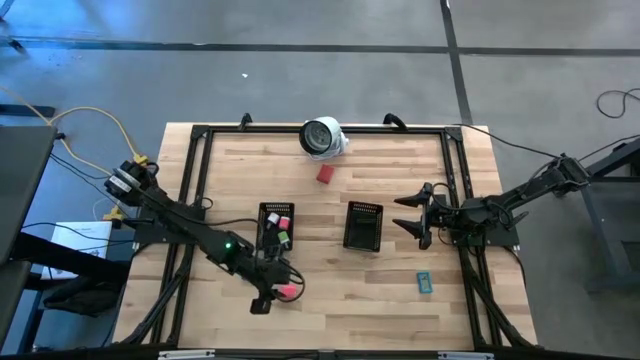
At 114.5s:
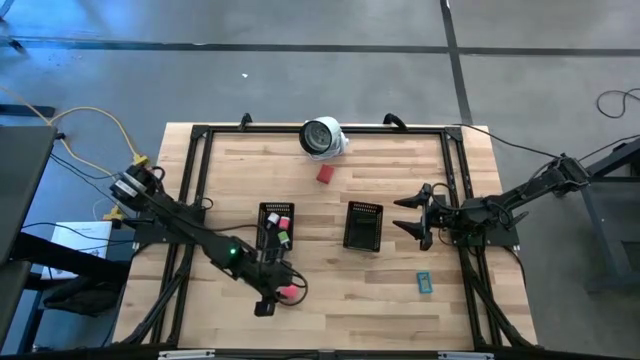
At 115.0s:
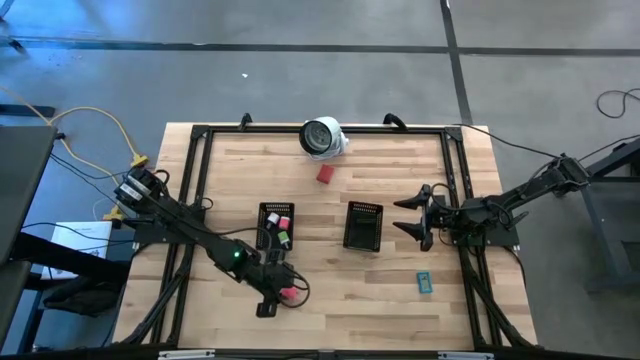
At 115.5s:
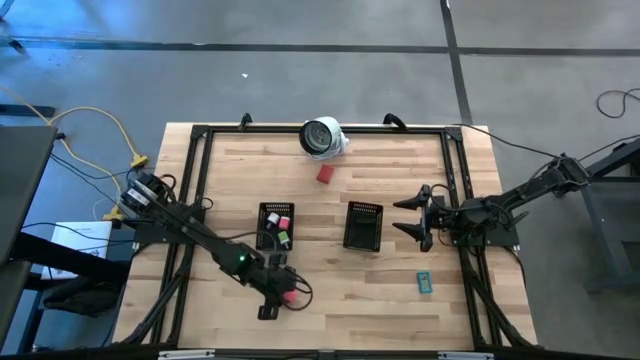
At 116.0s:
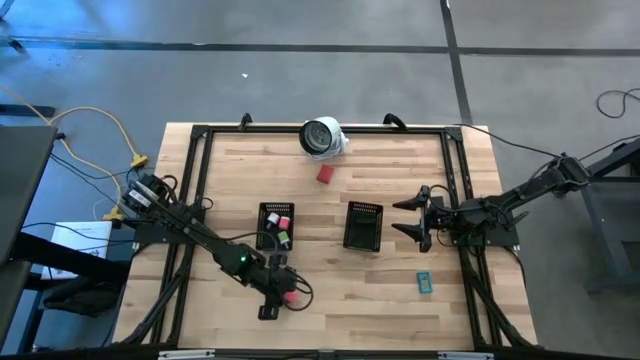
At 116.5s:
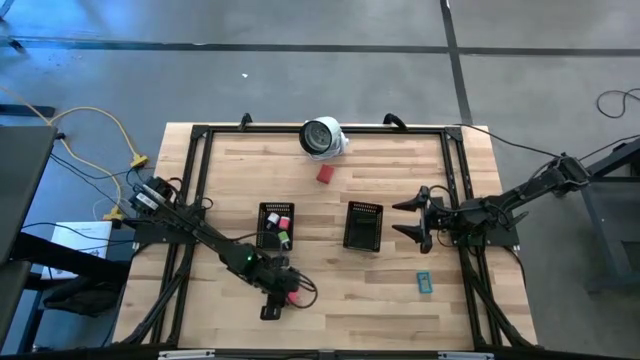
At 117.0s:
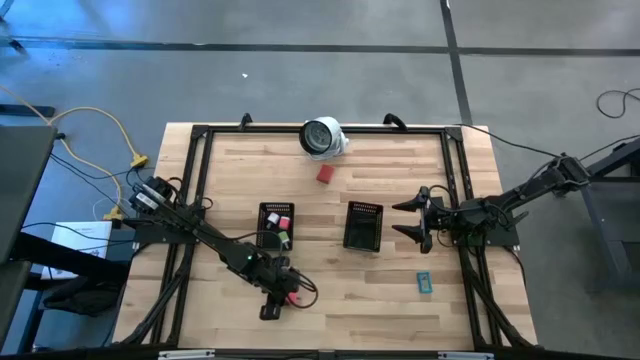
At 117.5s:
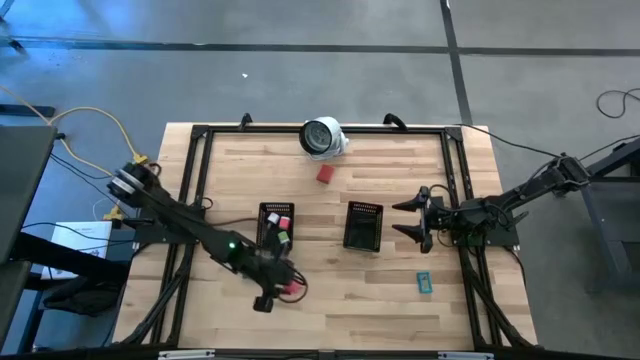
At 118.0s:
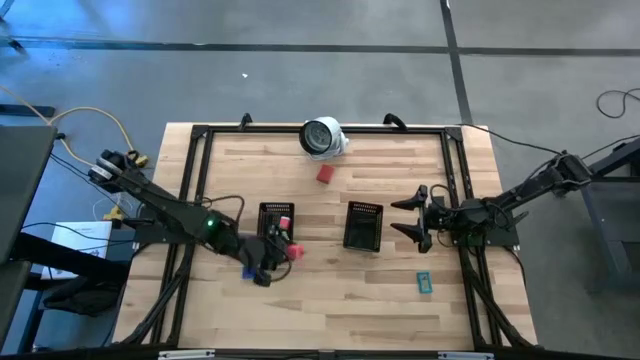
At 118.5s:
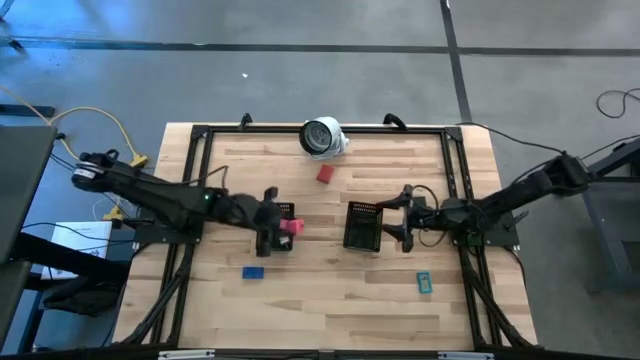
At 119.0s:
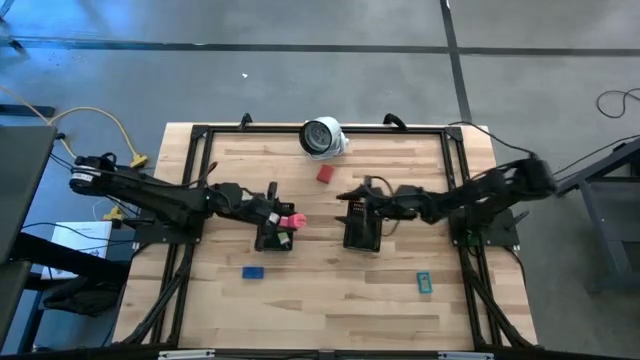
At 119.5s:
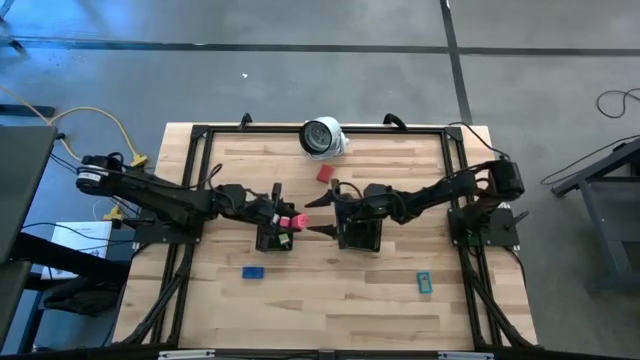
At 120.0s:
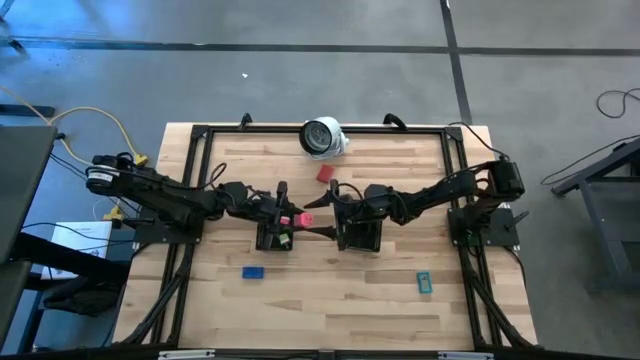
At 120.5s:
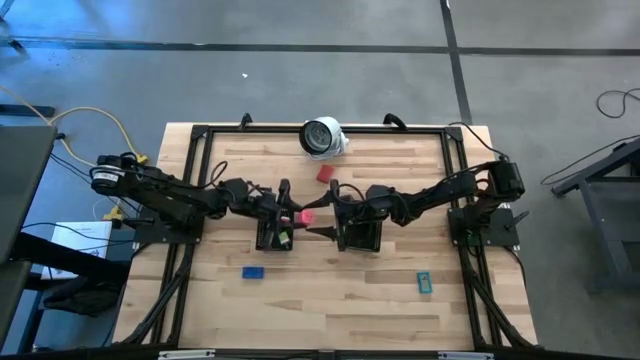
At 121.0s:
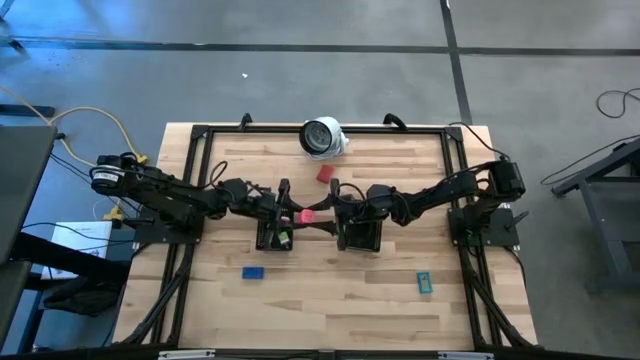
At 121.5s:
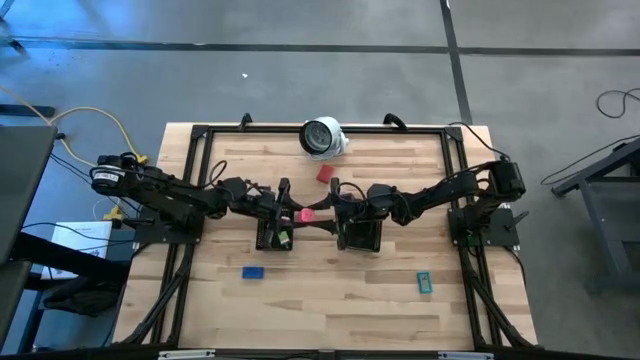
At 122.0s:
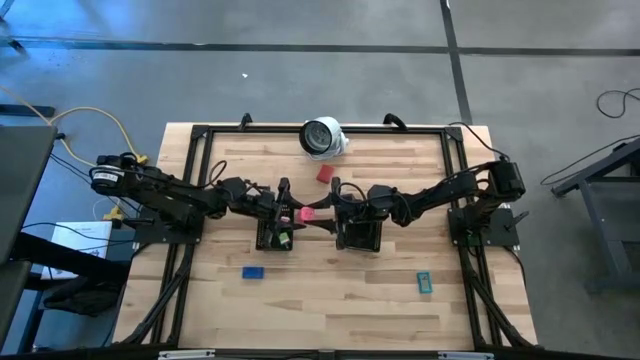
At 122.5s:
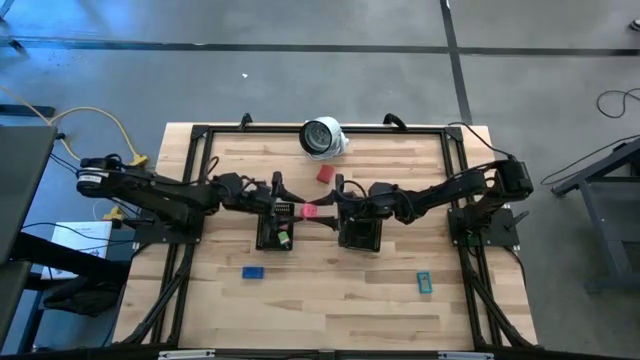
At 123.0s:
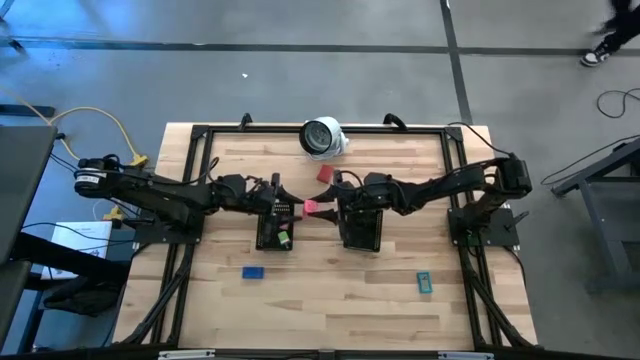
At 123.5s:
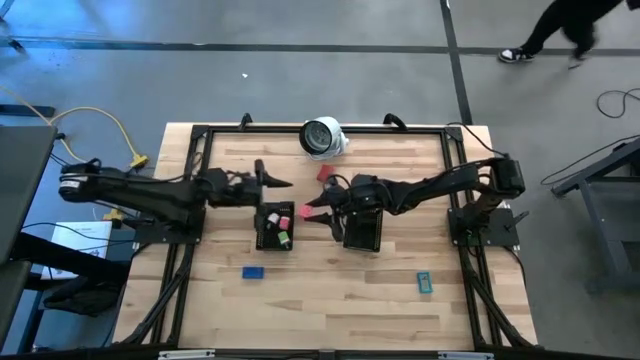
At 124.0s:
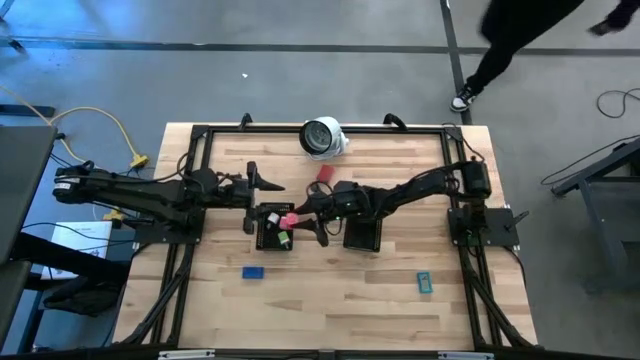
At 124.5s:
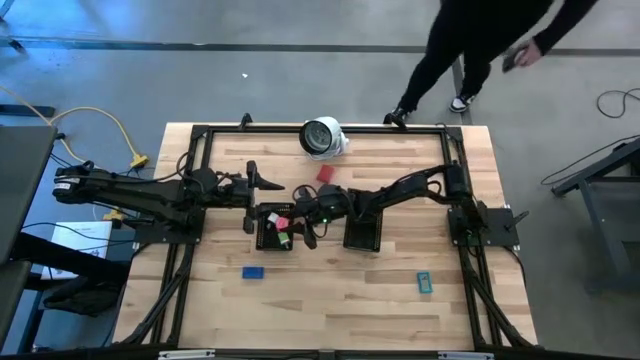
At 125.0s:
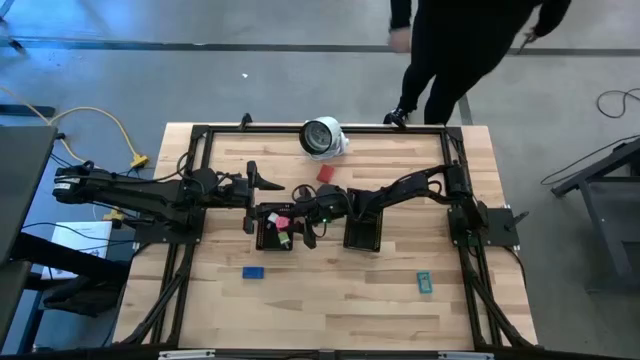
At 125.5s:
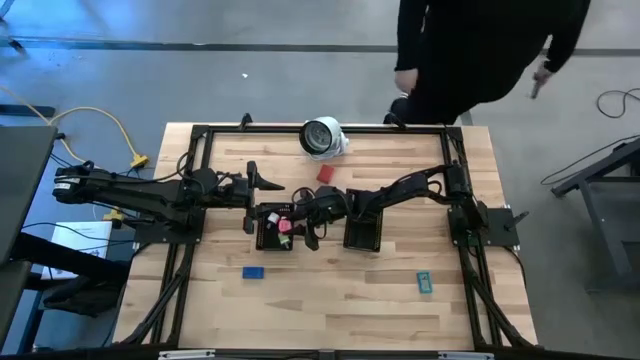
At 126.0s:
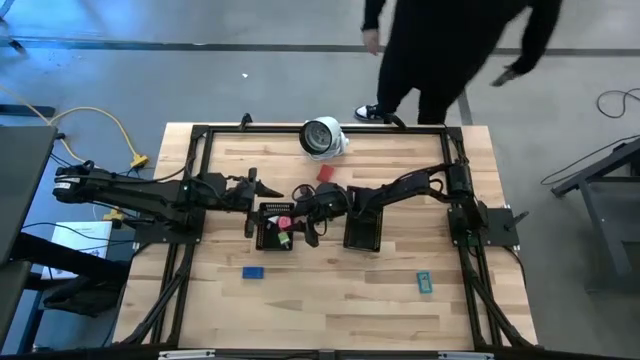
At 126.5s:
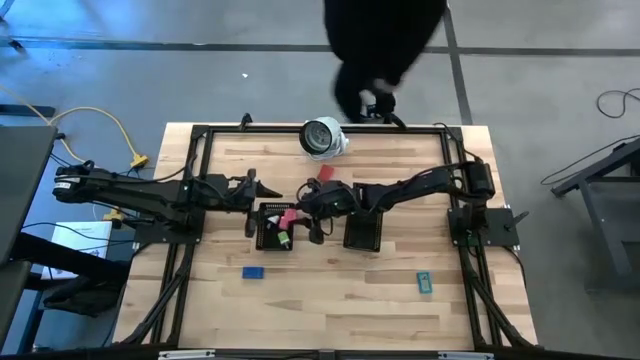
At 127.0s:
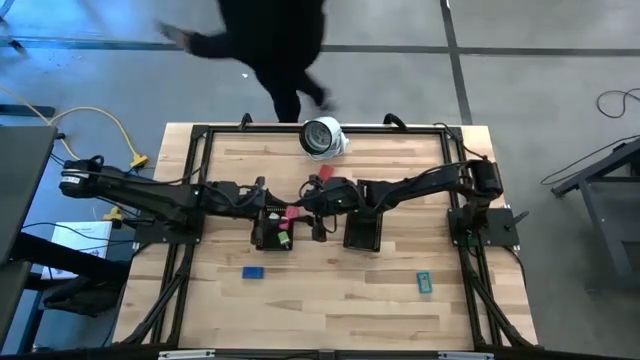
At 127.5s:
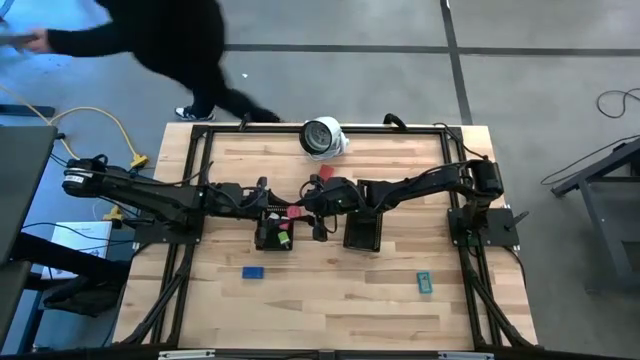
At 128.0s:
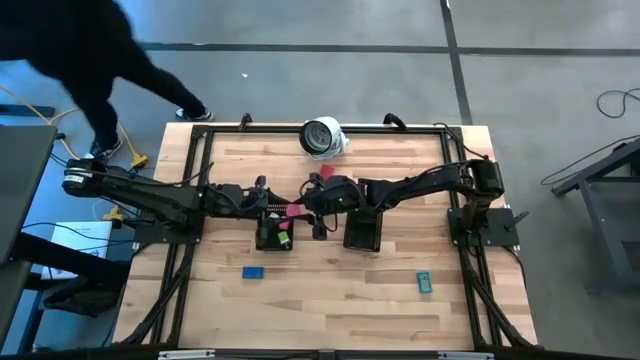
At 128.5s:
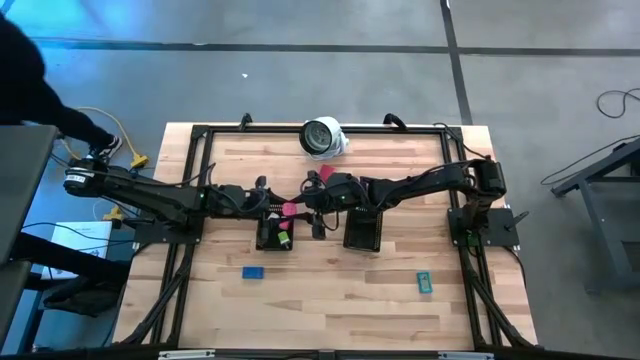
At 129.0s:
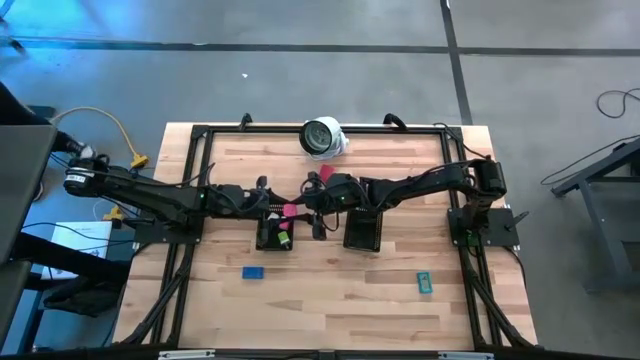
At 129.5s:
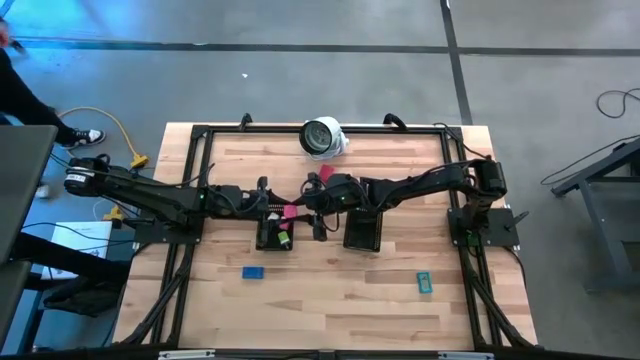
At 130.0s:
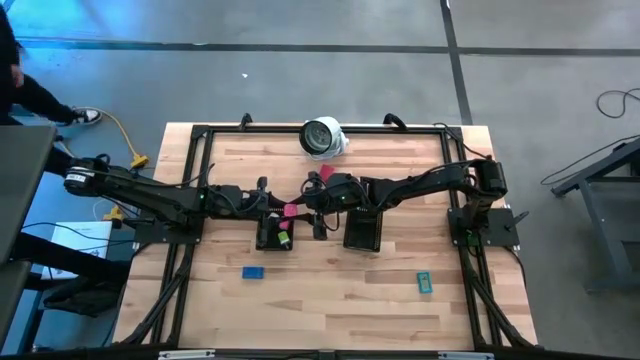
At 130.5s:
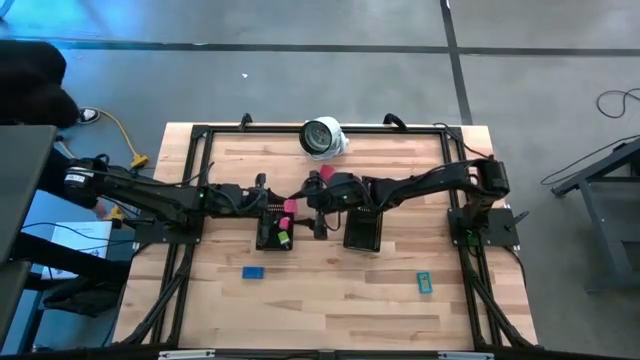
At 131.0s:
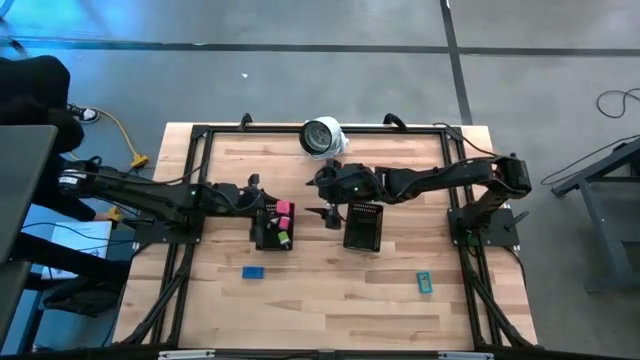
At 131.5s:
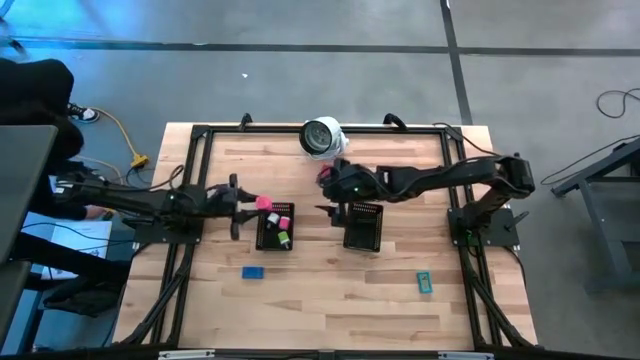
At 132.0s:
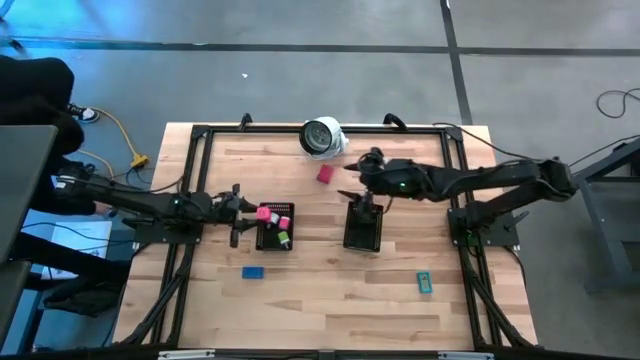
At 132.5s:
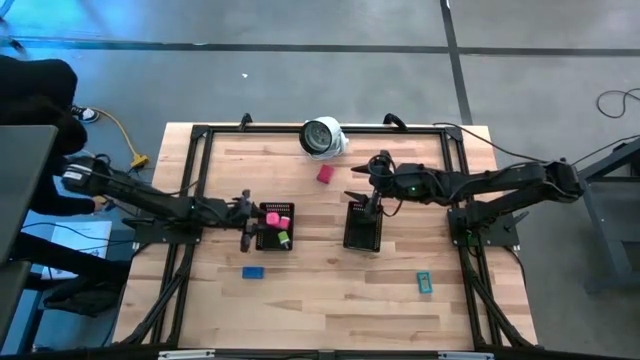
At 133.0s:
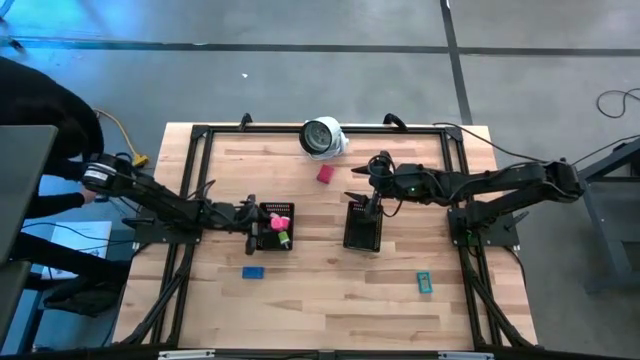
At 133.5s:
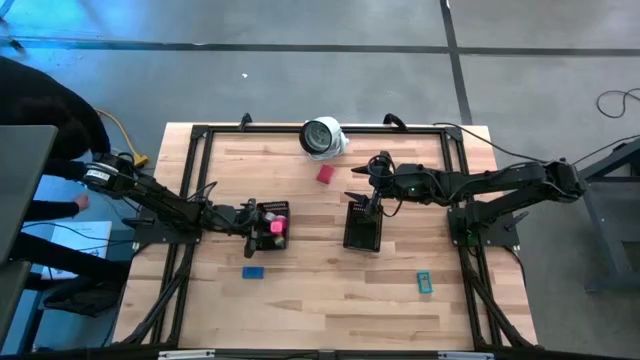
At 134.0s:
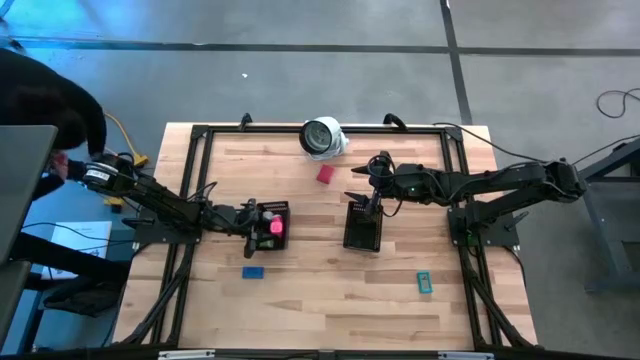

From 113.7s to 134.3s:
Task: Pick & Place Office items
Put the pink charger adapter into the left black bin

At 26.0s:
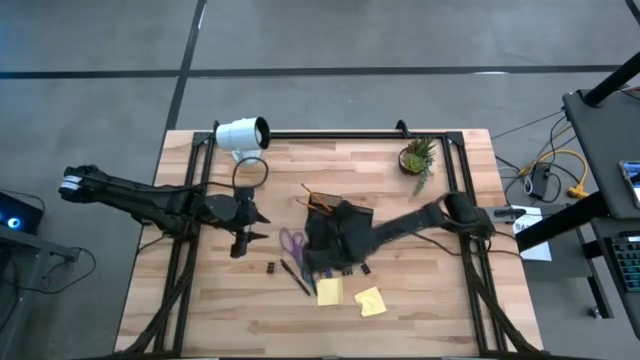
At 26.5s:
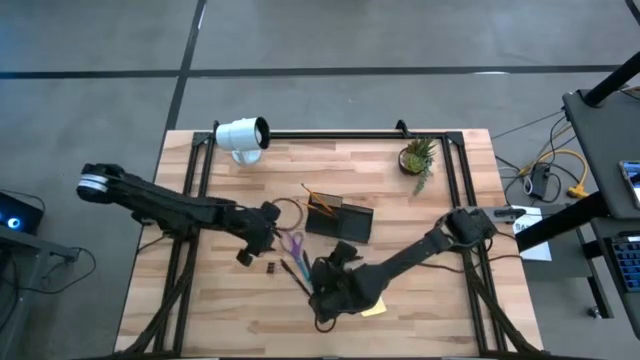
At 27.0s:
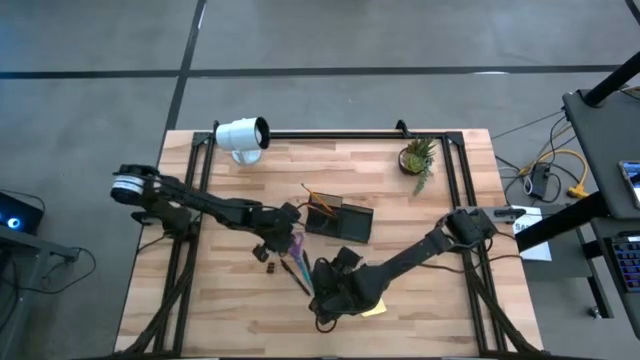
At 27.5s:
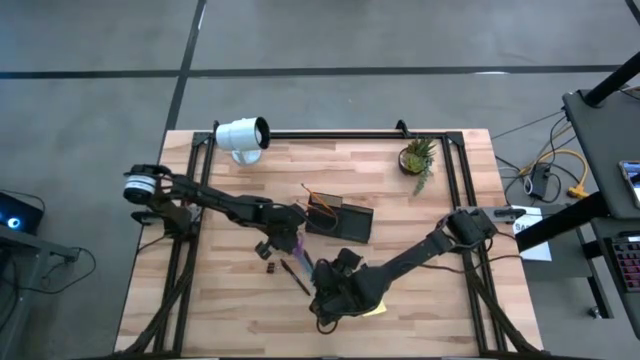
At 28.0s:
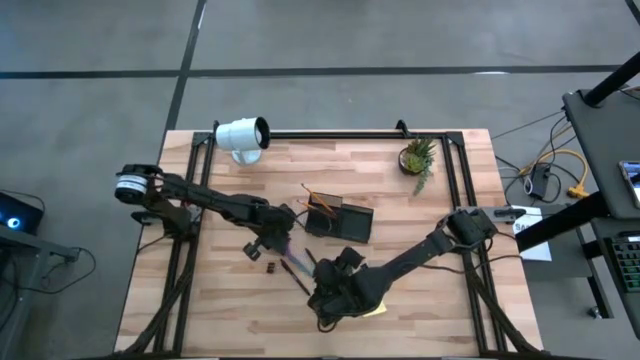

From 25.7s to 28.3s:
Task: Pick and place office supplies into organizer
Put the purple scissors into the black desk organizer
